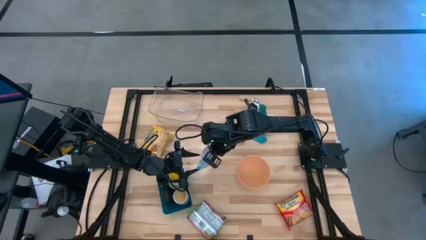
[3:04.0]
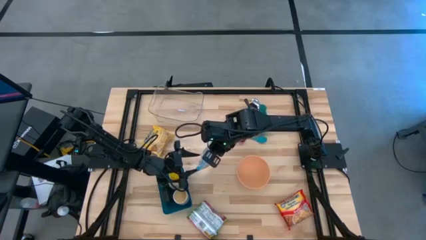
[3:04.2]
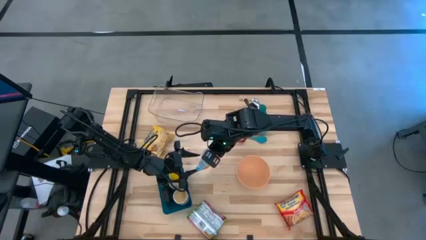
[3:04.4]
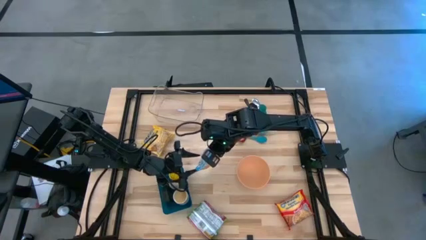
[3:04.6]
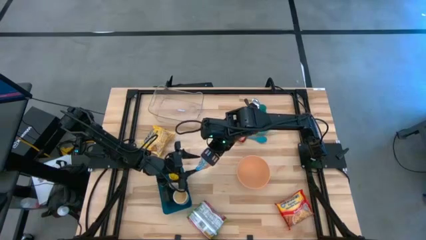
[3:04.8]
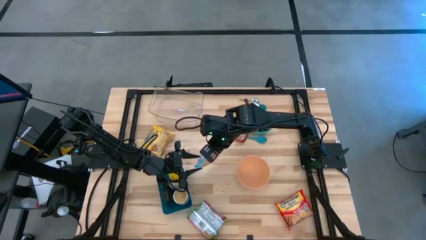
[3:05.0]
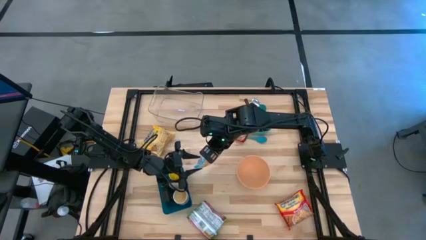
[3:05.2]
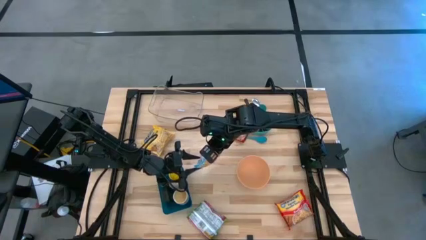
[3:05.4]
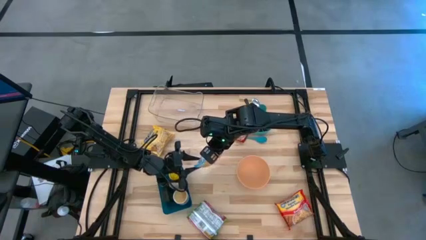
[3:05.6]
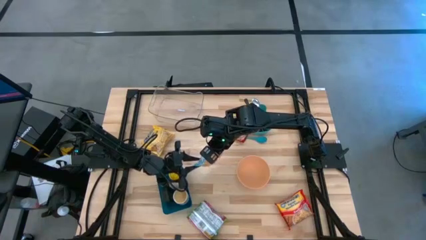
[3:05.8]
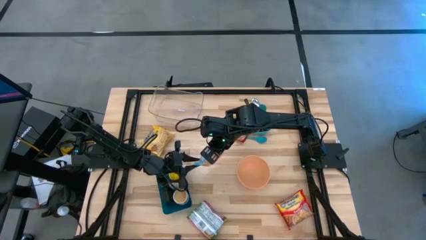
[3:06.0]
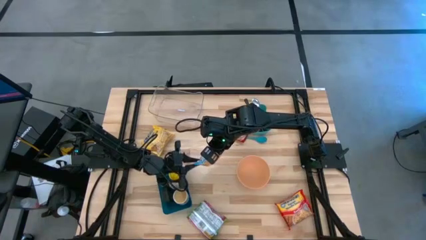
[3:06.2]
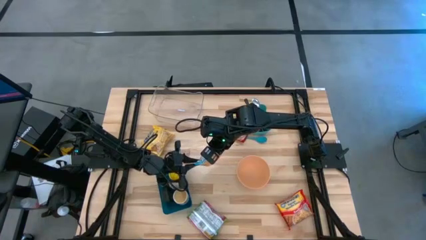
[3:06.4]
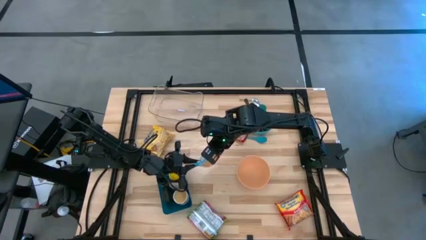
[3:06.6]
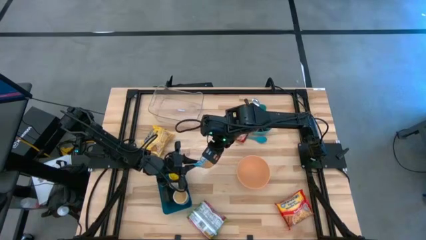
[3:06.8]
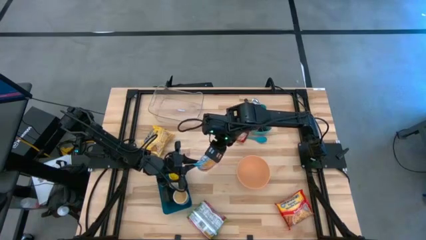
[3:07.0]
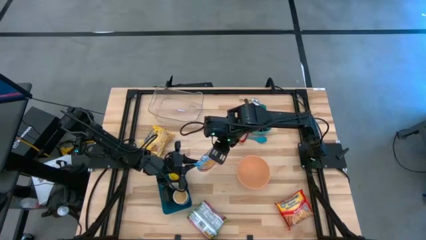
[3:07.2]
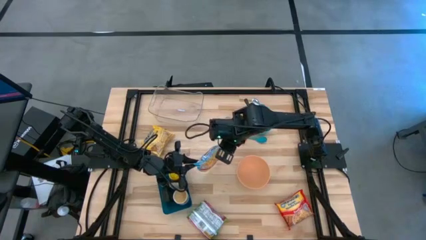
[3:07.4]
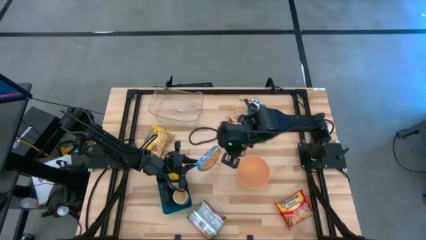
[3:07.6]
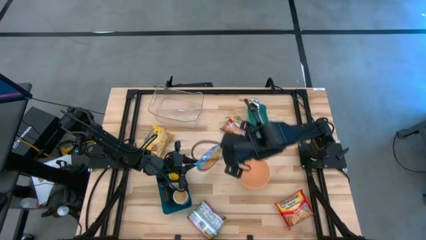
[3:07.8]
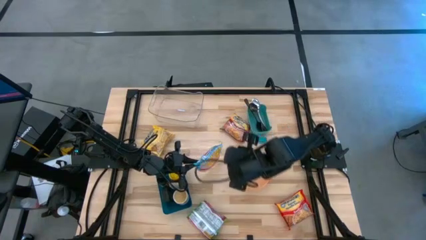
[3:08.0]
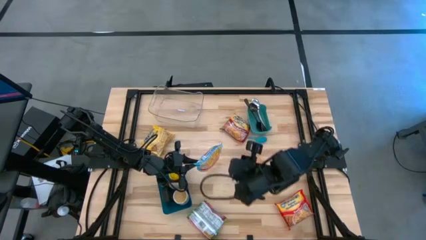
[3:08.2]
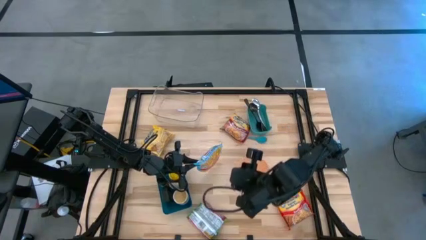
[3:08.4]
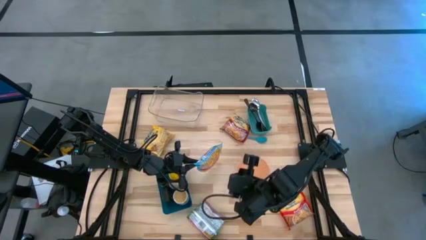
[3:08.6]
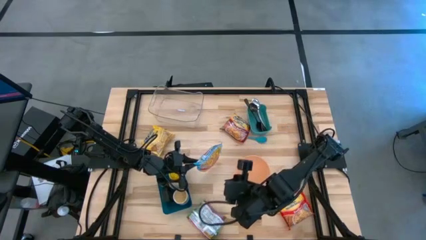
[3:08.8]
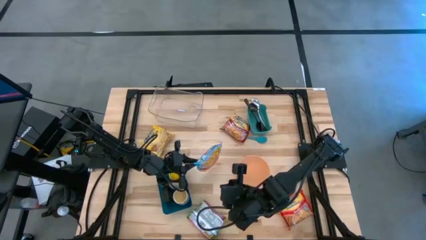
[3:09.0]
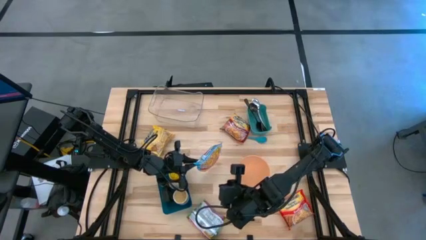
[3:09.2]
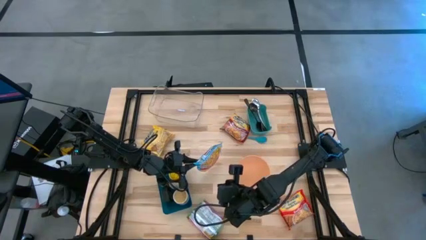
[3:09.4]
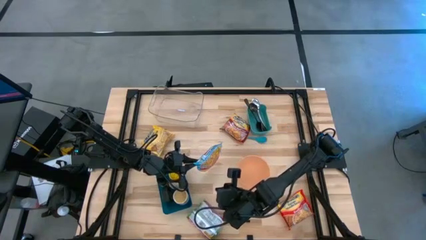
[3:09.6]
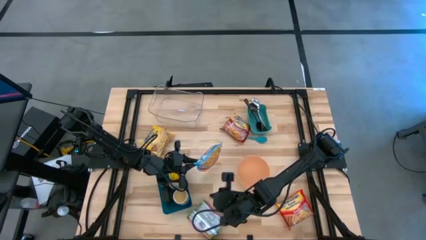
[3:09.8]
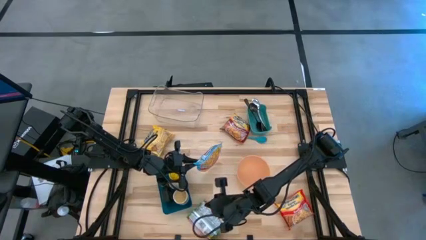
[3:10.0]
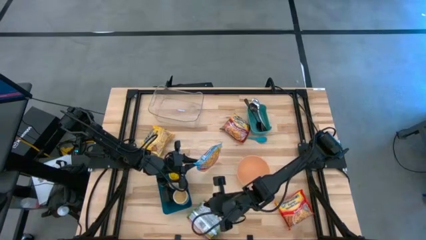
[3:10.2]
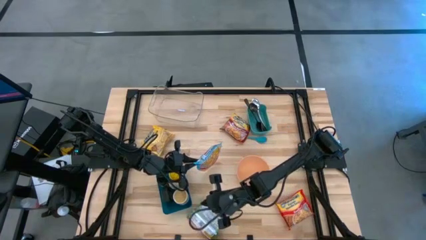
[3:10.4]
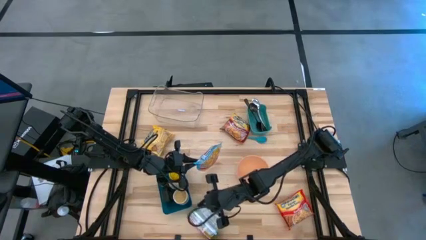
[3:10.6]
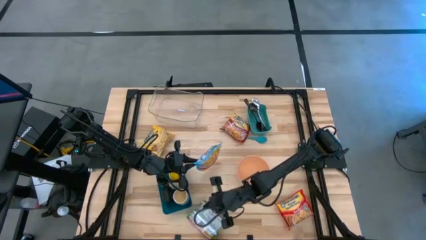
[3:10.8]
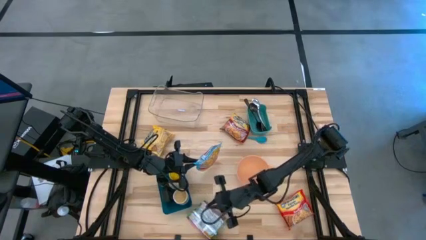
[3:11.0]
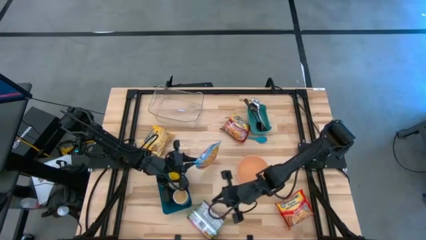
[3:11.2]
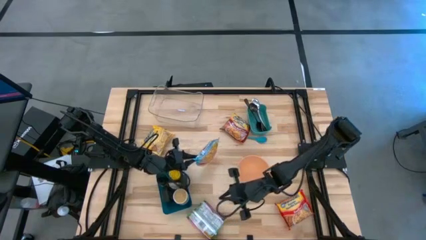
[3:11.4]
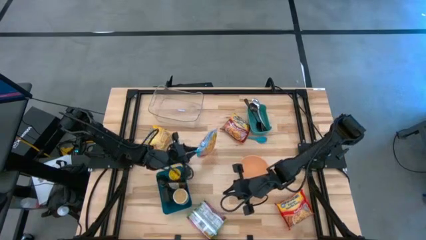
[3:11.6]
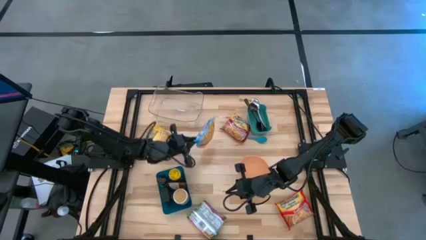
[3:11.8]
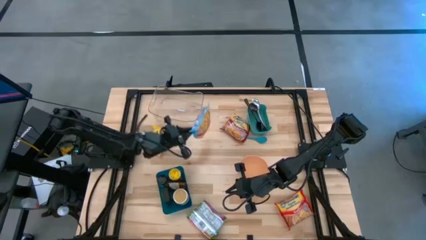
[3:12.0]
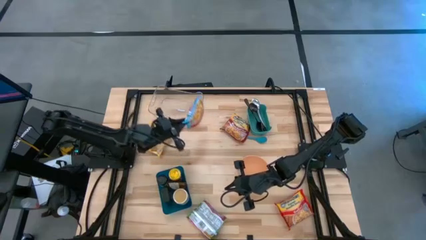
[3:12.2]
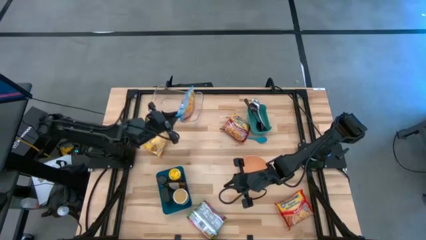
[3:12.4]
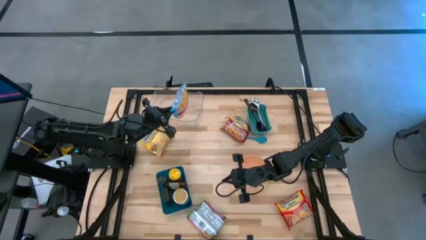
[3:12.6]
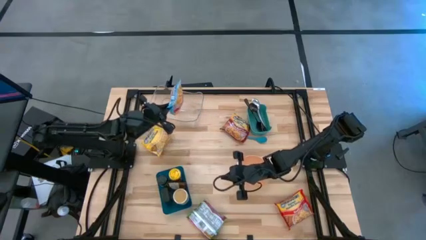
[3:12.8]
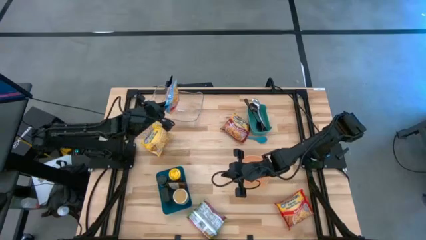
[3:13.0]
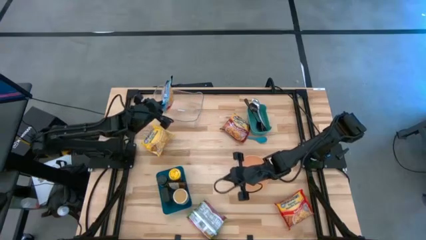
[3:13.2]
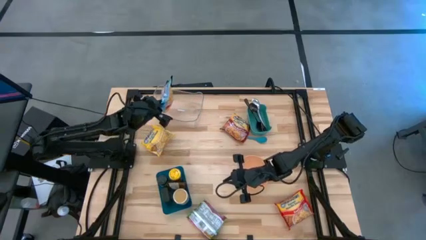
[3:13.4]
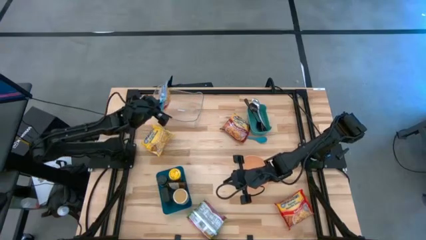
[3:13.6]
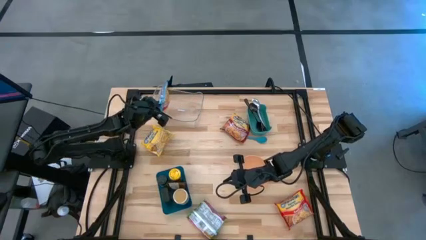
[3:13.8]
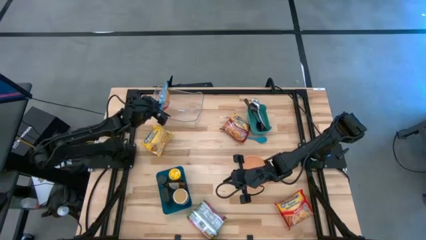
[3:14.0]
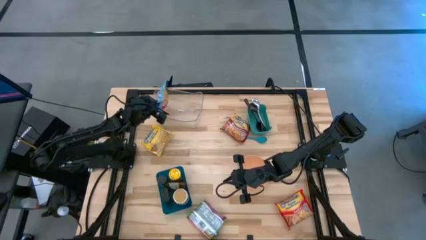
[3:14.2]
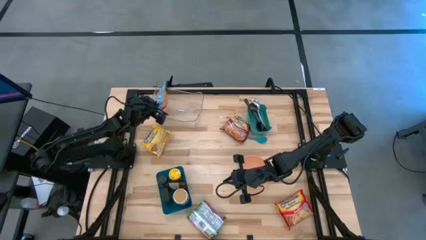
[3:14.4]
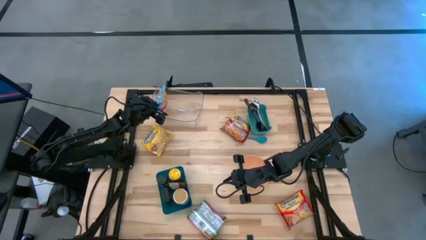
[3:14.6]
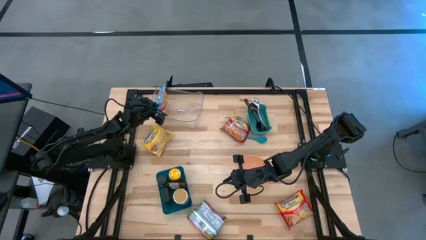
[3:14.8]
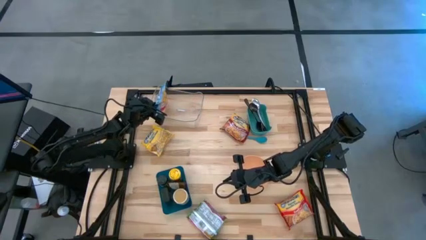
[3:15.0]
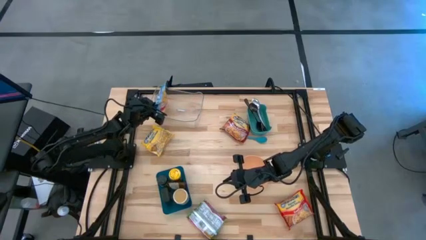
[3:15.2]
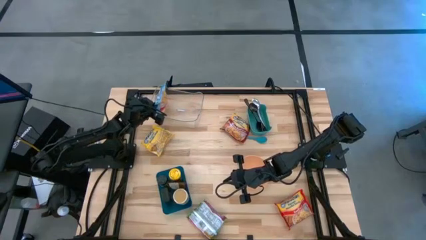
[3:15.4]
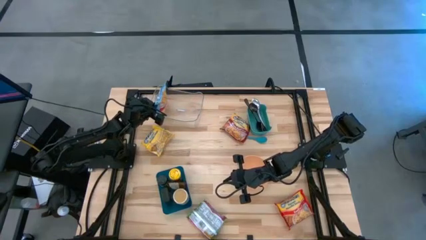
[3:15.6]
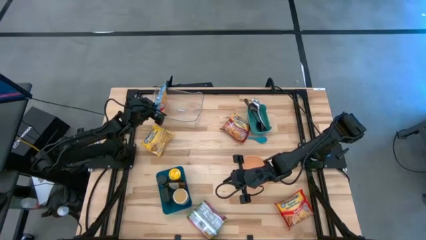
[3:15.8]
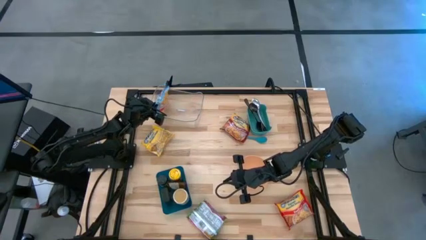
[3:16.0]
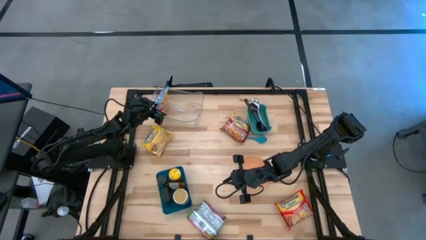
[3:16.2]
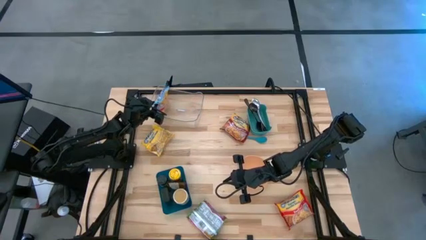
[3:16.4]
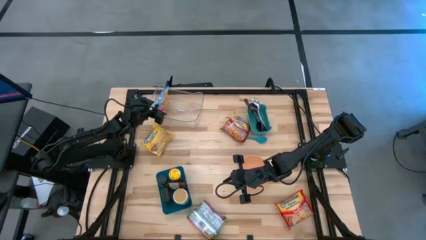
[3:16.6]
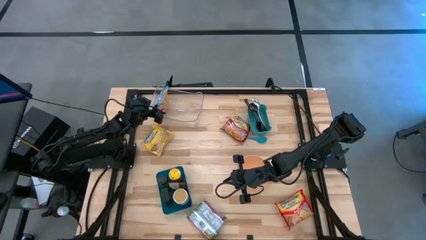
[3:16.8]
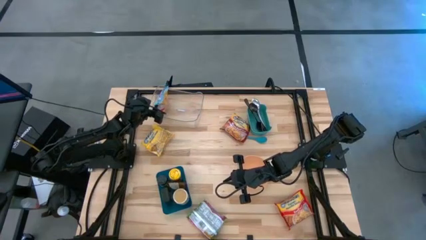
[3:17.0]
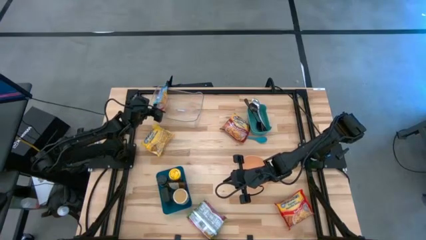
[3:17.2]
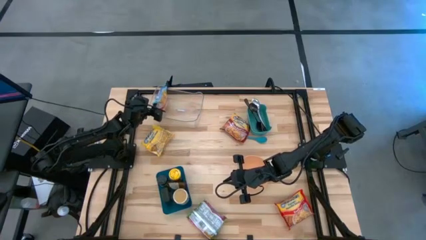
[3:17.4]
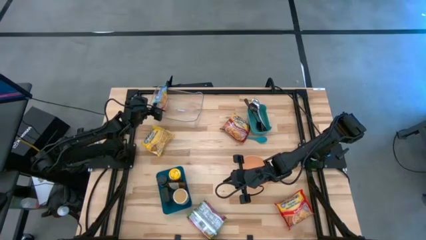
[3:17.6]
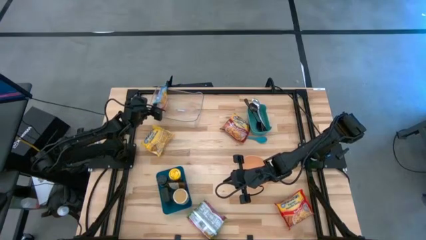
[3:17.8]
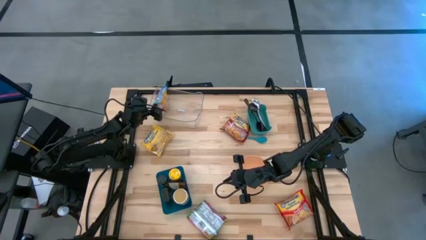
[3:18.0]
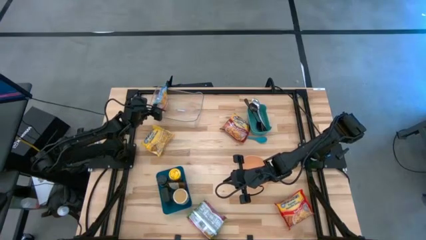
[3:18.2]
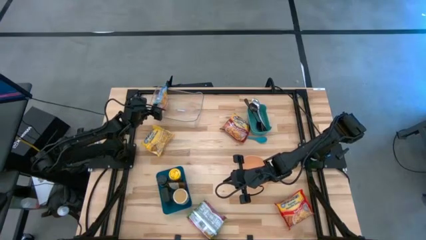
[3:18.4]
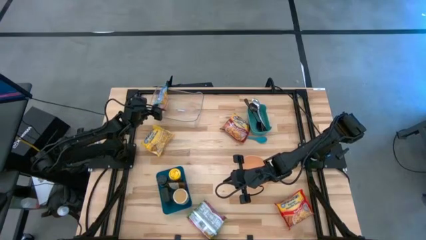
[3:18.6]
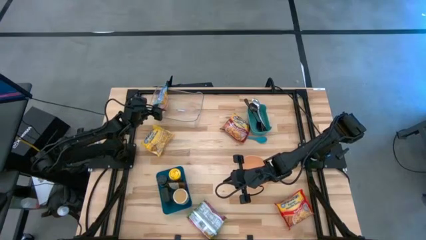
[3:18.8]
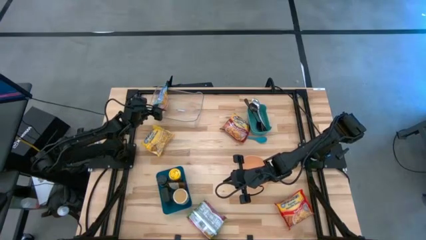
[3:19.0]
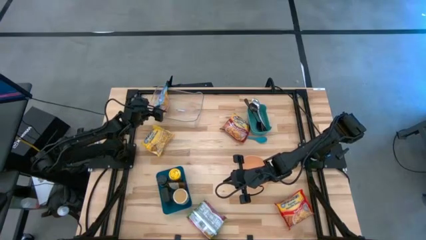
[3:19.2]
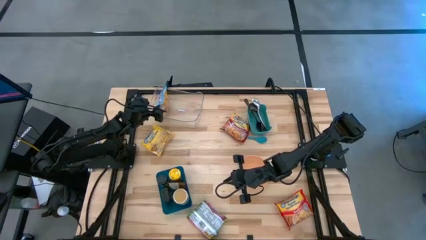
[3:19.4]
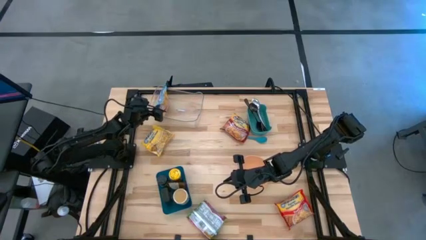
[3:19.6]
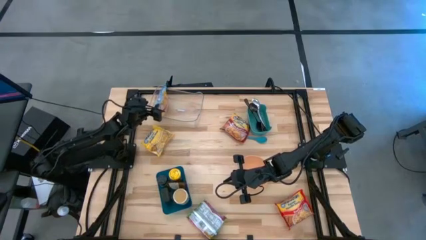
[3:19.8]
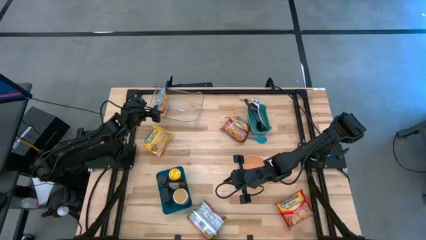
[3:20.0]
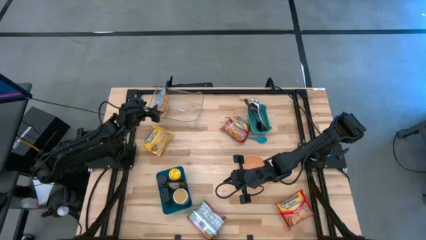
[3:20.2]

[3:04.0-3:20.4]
Task: Pick & Place Food Item
Put the light blue noodle pack into the transparent bin
